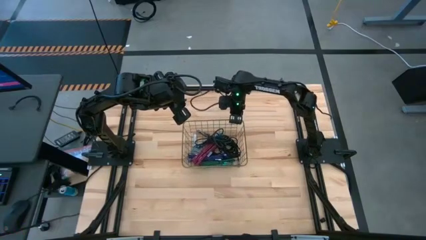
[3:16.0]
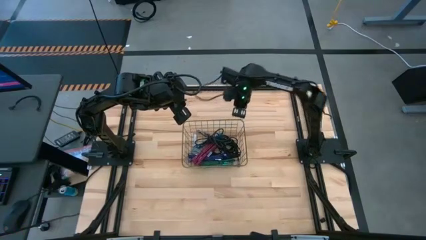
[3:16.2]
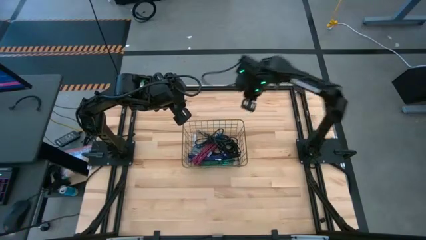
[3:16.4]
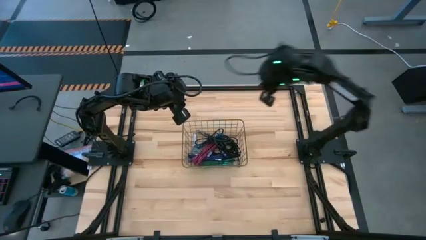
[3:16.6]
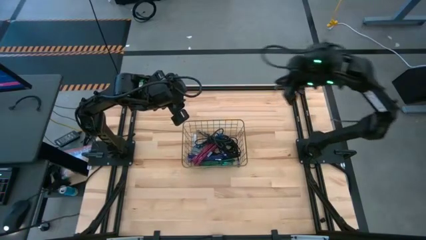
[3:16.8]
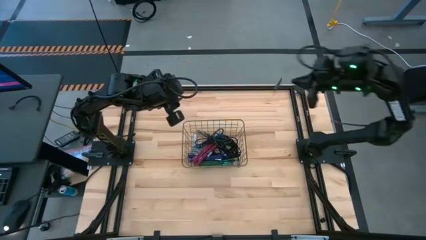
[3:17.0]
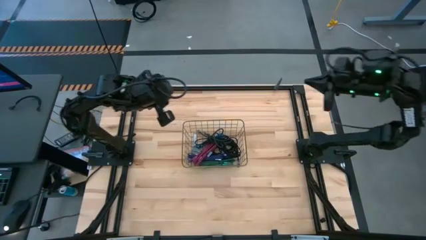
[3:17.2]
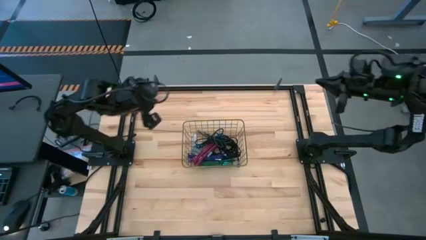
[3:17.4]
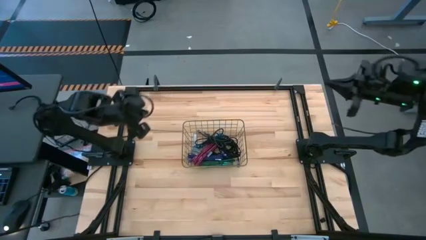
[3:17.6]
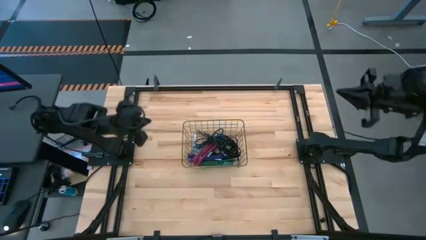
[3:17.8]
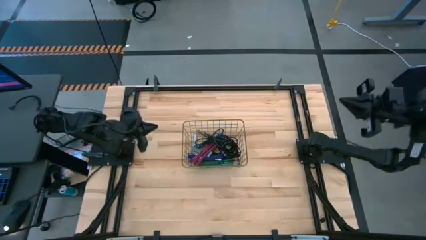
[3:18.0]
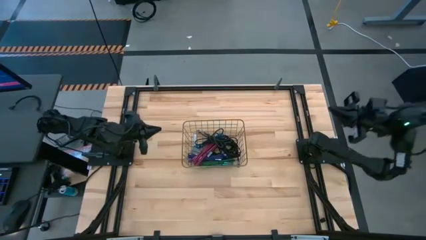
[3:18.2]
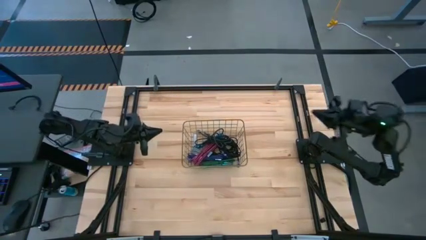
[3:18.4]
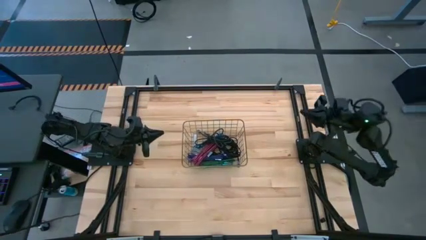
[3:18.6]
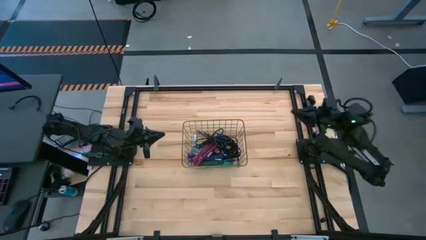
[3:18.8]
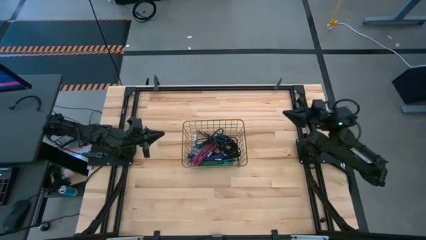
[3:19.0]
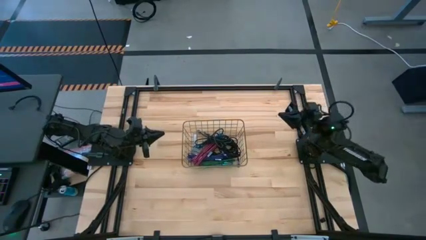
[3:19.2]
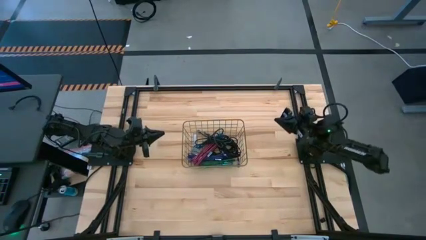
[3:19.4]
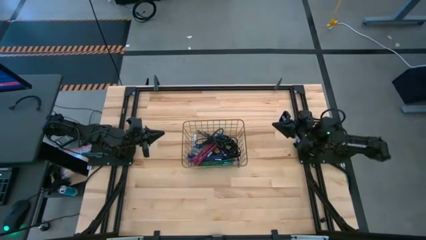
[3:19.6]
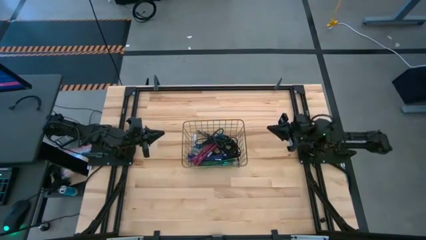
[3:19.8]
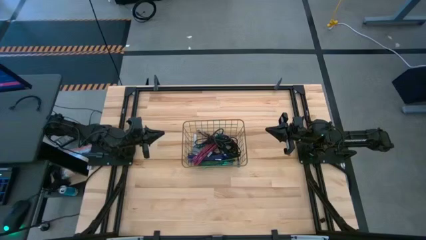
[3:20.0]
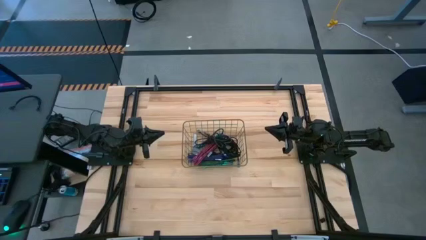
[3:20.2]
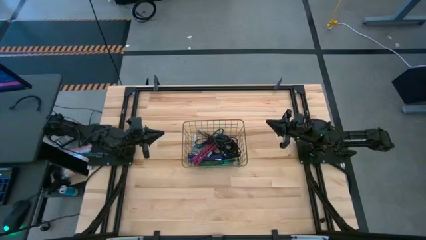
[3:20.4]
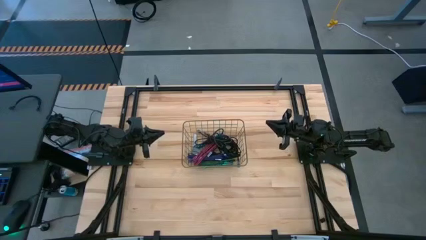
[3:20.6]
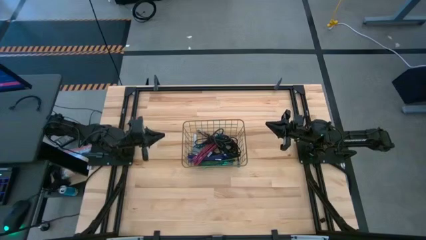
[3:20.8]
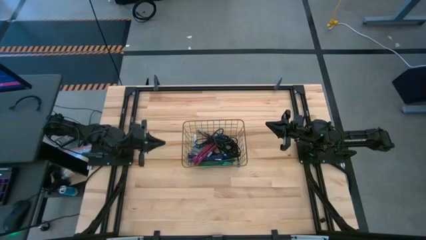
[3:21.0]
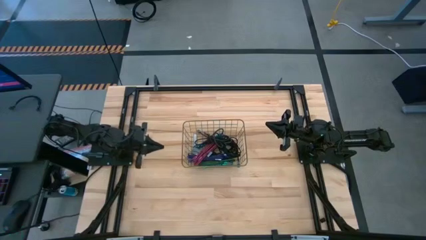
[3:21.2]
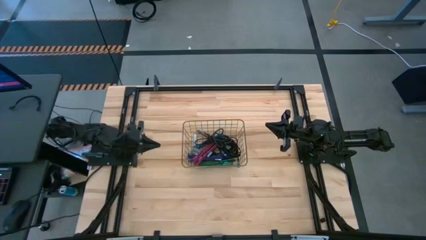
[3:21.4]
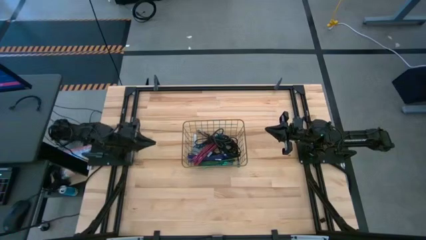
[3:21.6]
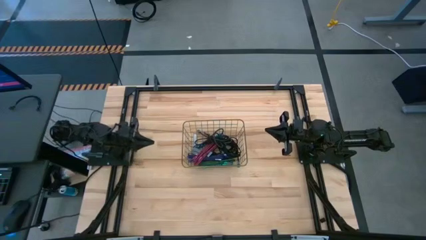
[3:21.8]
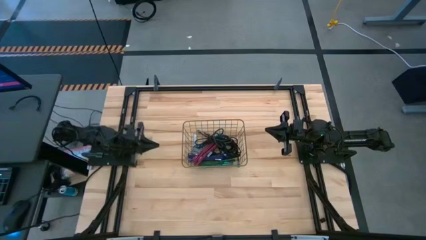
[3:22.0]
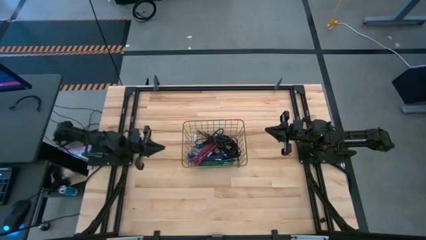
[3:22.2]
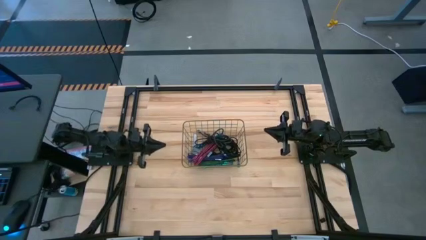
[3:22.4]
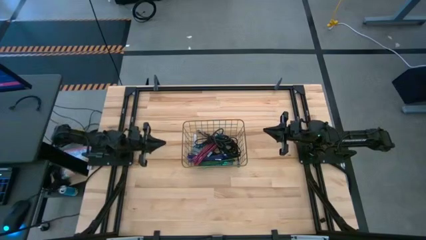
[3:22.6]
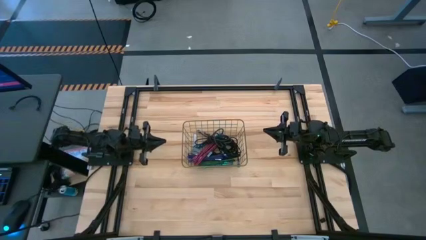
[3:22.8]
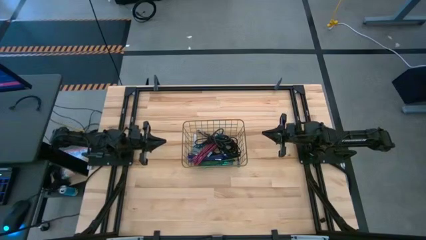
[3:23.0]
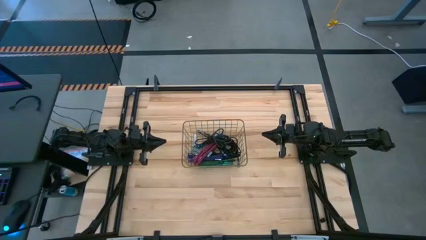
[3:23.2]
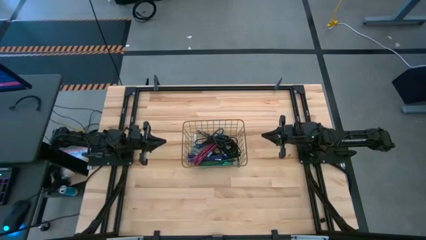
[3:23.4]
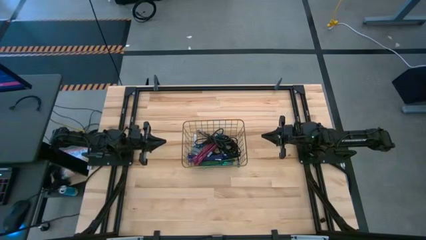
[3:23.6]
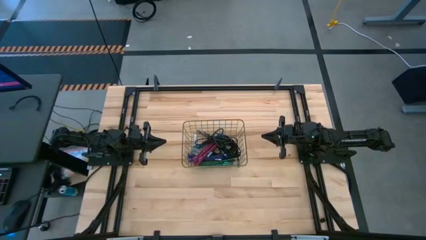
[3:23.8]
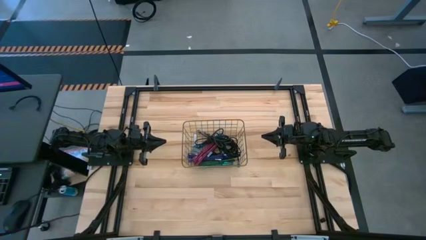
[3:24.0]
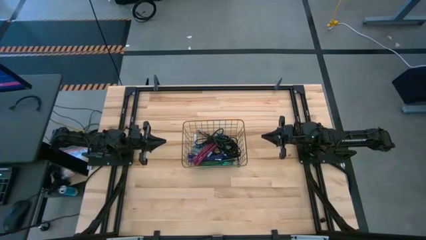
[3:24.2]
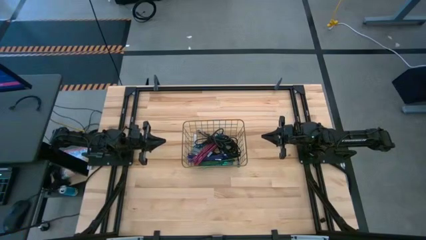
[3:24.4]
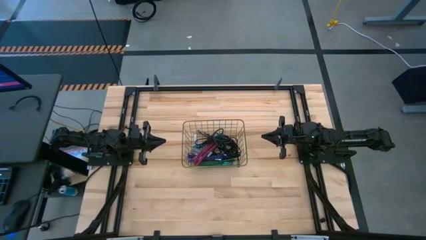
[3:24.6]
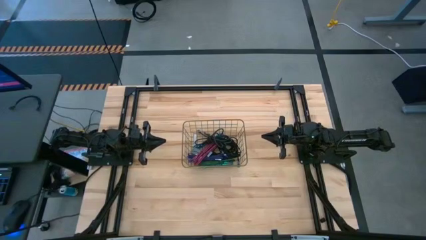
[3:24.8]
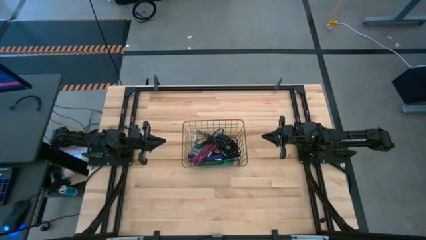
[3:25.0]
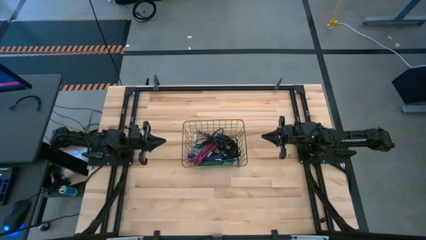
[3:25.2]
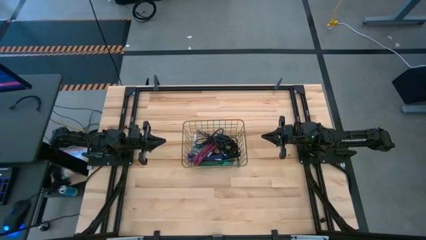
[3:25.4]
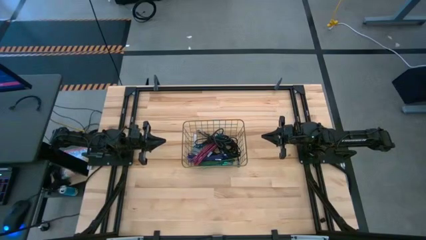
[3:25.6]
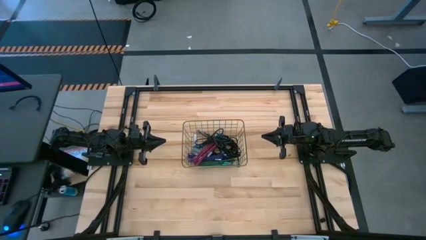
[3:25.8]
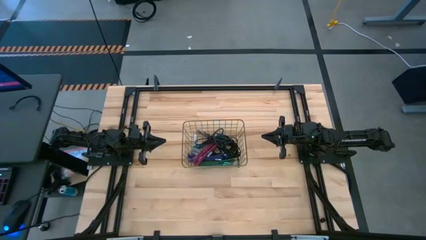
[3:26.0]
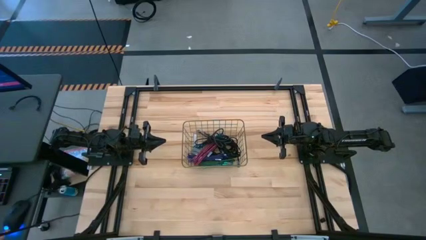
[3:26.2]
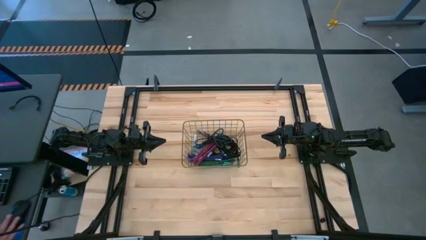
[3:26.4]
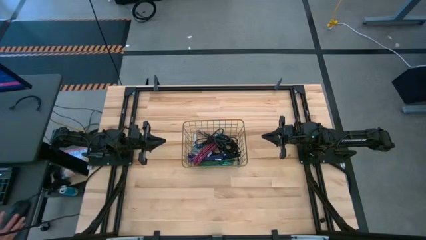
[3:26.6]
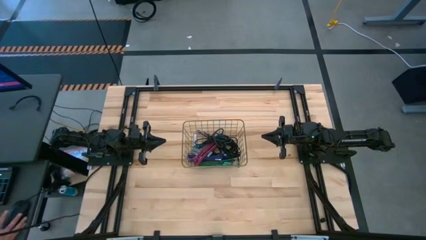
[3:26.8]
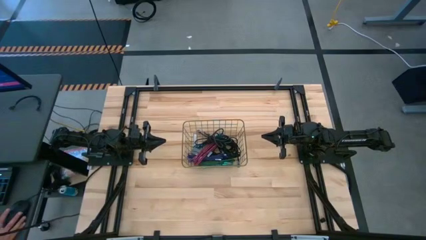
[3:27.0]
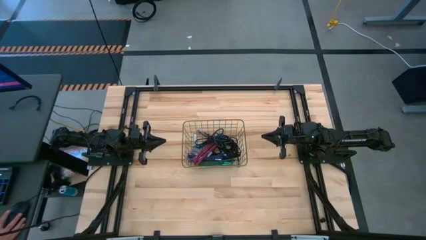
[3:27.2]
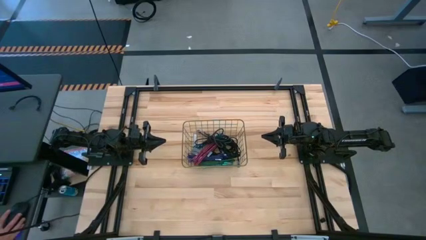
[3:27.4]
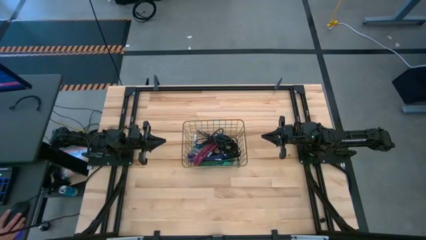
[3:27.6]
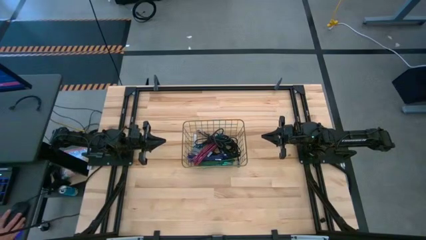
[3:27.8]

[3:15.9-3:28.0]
Task: Pick and place USB-C Cables
Return to Home Position

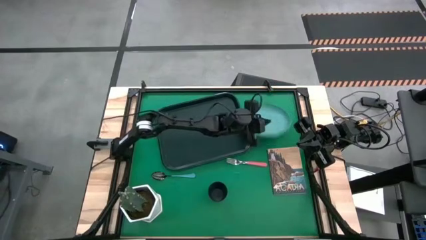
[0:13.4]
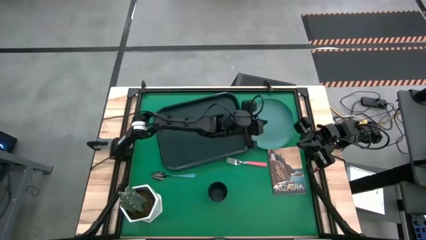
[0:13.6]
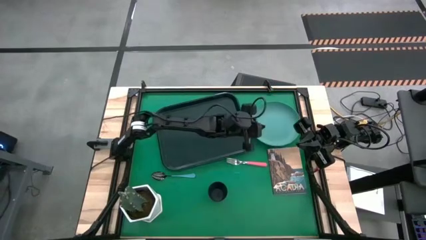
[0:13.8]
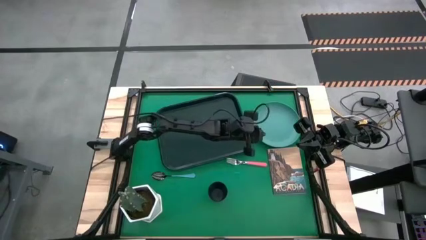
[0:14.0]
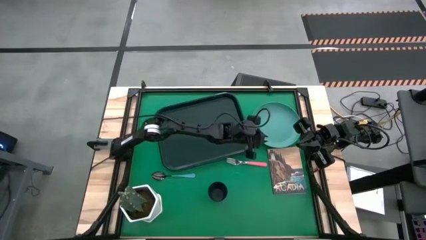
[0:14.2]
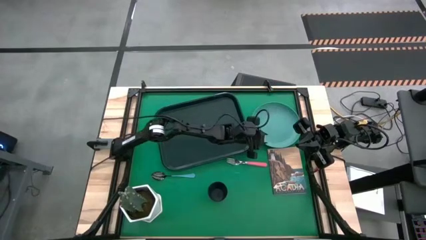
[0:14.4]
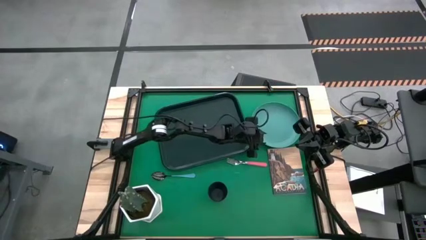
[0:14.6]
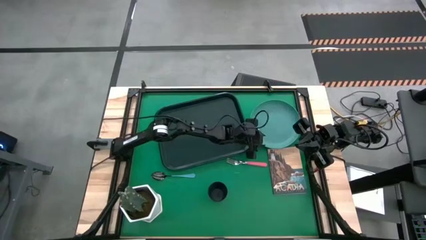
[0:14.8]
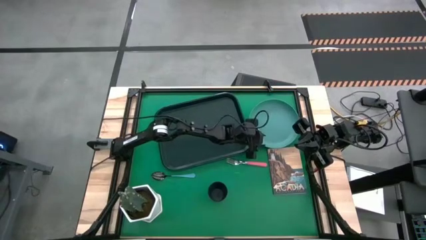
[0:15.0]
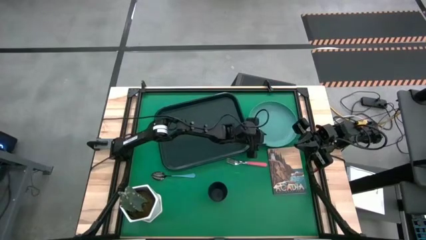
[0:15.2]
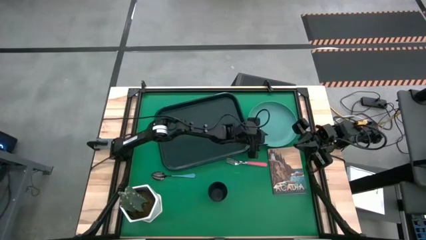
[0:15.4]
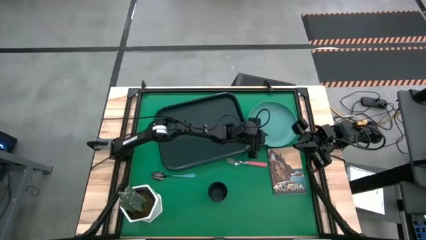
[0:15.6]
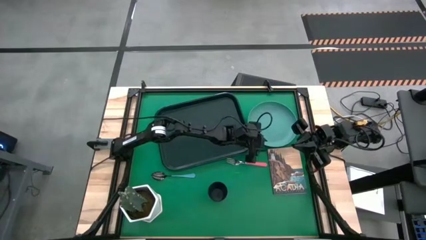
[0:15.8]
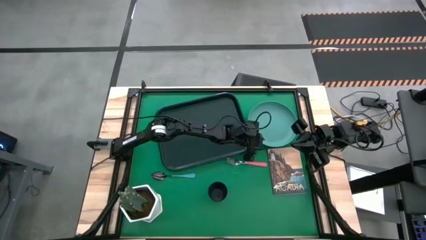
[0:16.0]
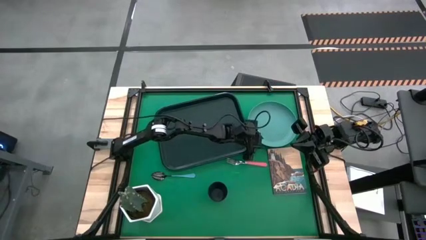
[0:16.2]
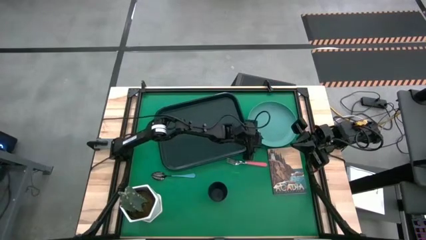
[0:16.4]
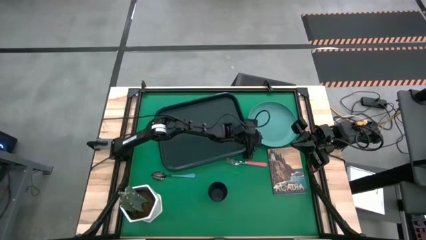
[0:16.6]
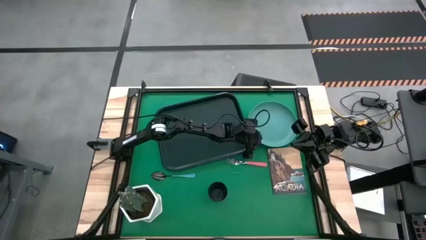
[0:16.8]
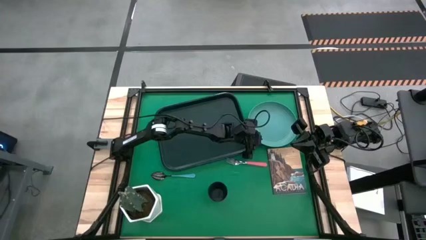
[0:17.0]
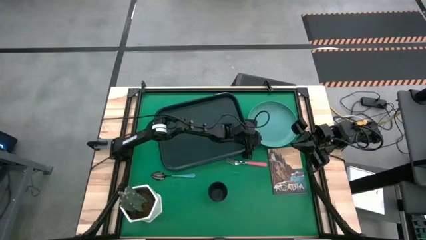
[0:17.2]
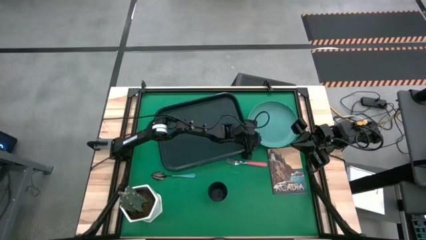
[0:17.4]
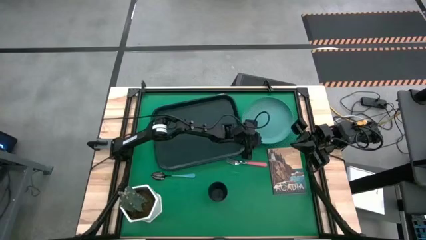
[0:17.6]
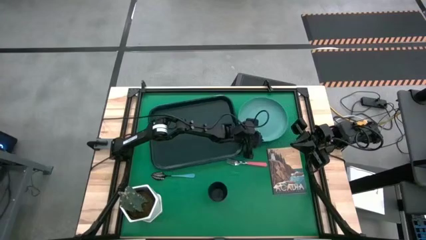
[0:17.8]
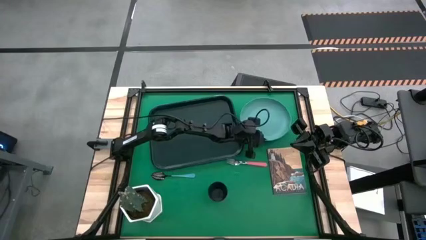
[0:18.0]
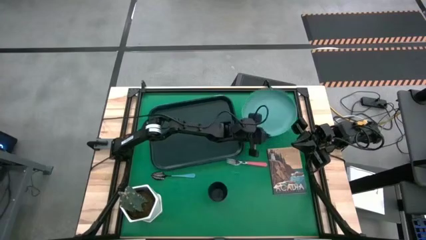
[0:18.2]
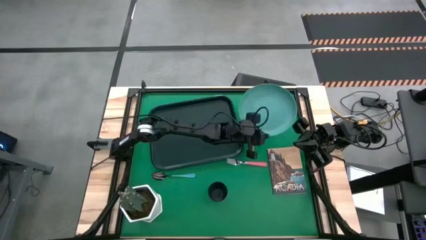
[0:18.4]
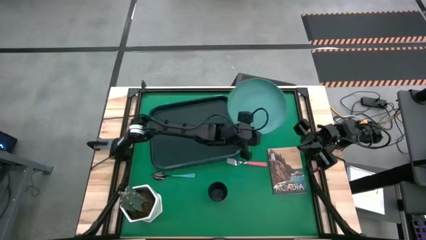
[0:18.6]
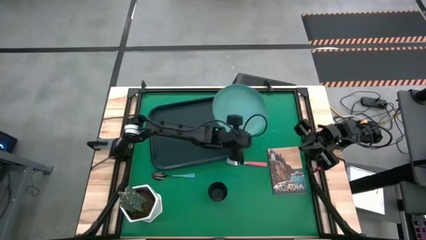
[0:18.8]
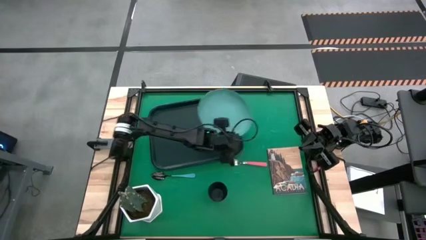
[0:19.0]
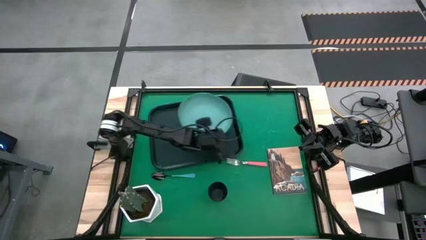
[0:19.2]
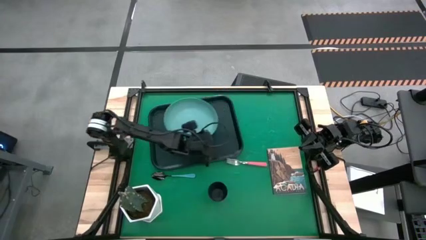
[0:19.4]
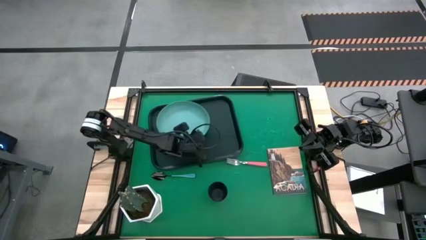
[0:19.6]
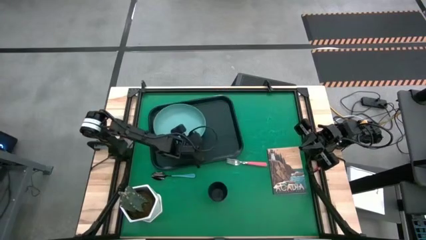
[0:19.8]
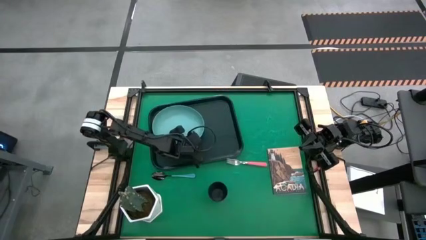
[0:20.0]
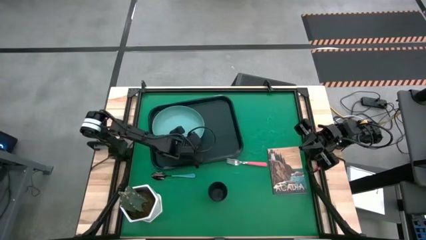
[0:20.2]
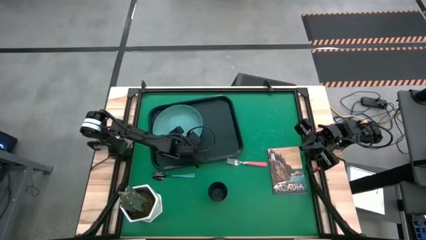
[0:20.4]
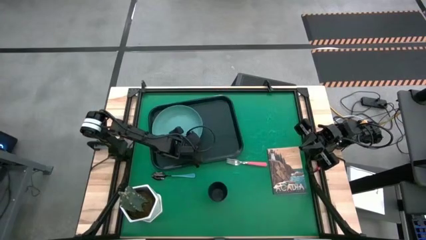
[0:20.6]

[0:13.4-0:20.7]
Task: Pick and place plate/cup/fork/spoon on tray
Put the green plate on the black tray
